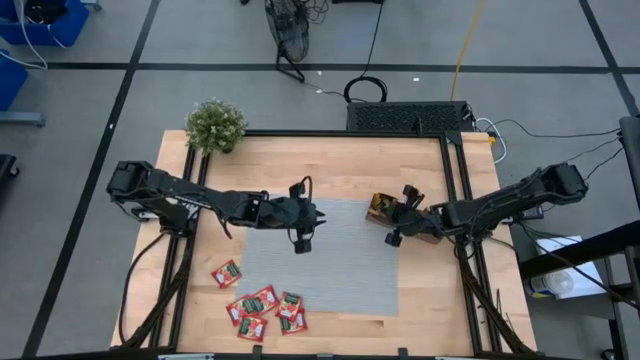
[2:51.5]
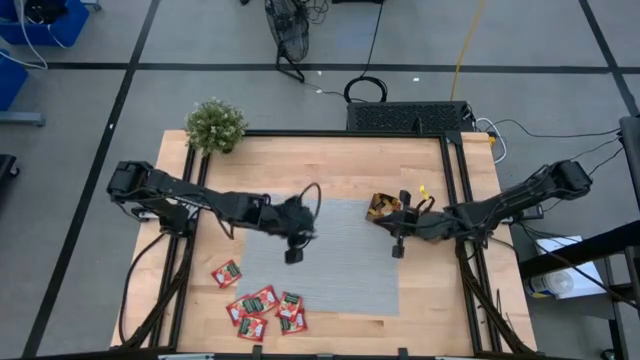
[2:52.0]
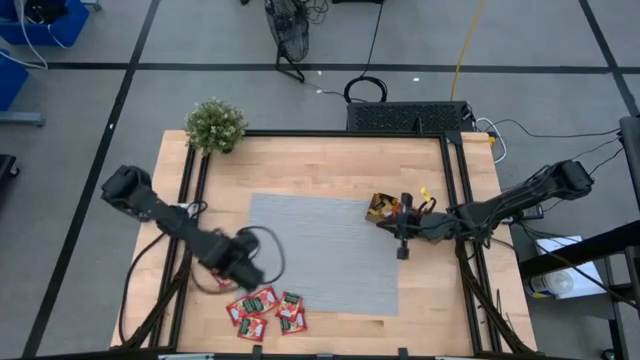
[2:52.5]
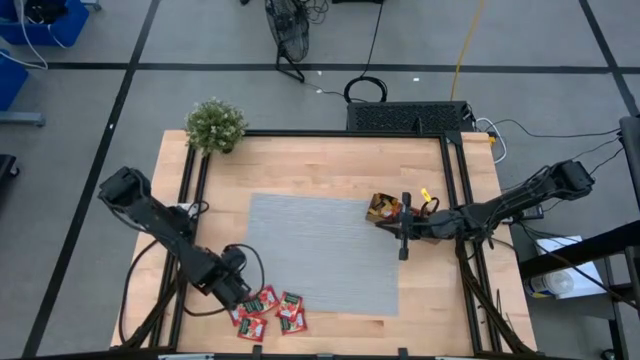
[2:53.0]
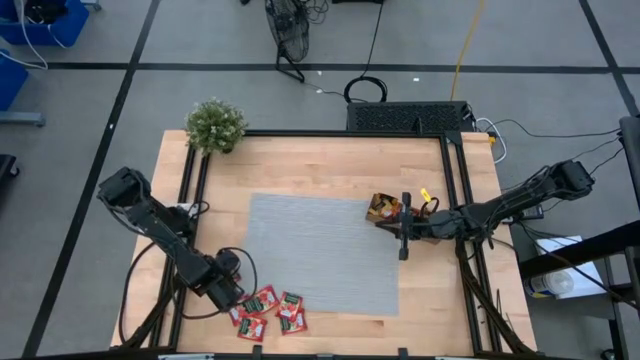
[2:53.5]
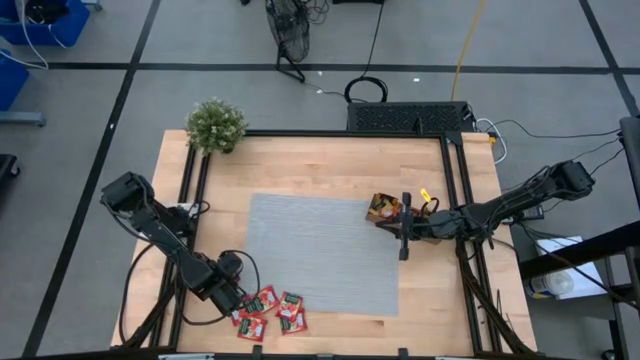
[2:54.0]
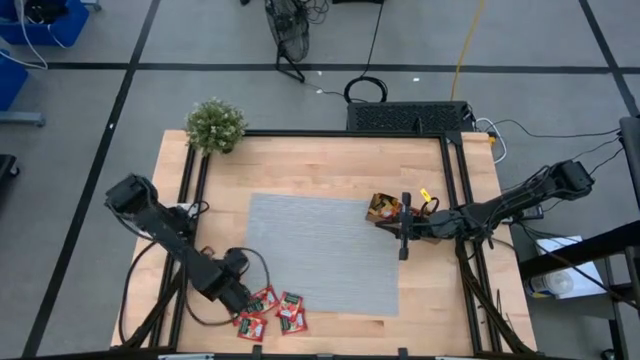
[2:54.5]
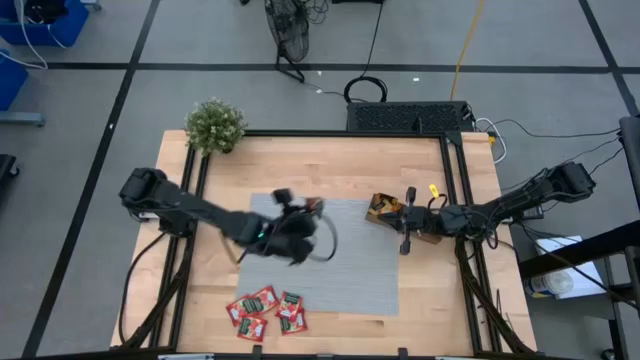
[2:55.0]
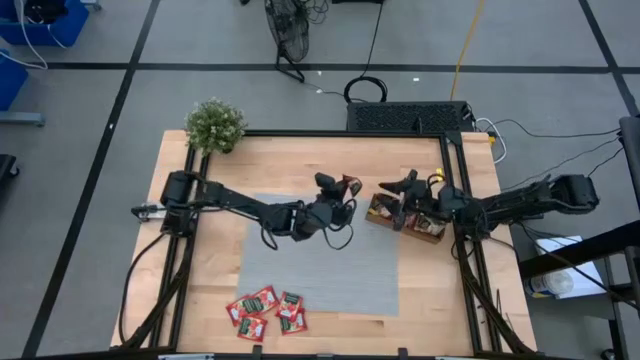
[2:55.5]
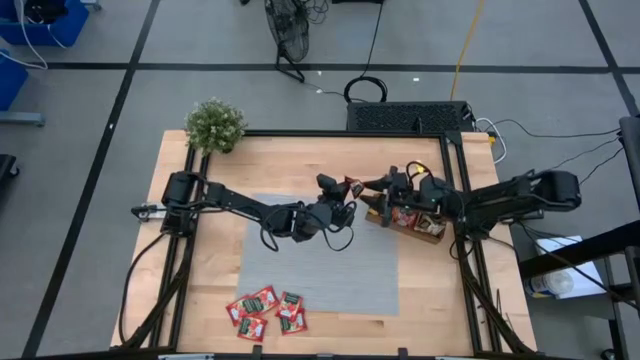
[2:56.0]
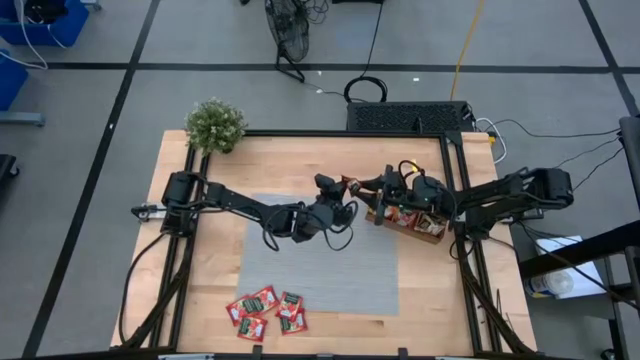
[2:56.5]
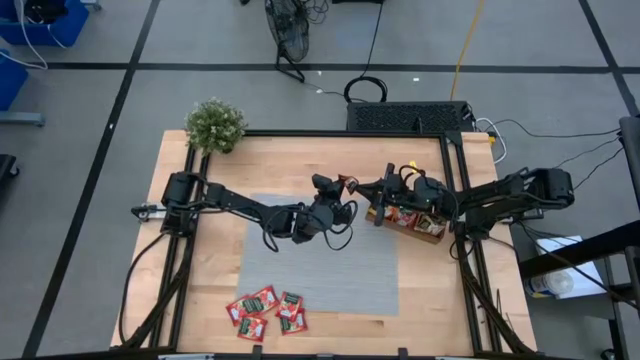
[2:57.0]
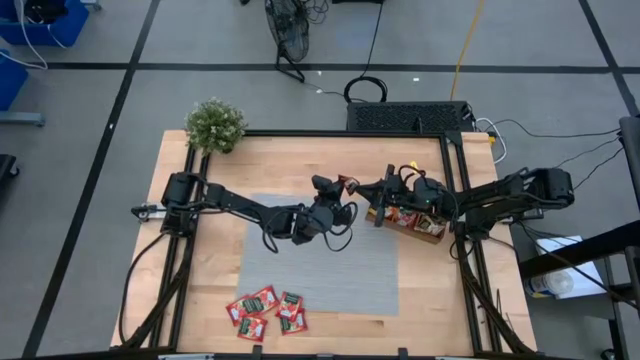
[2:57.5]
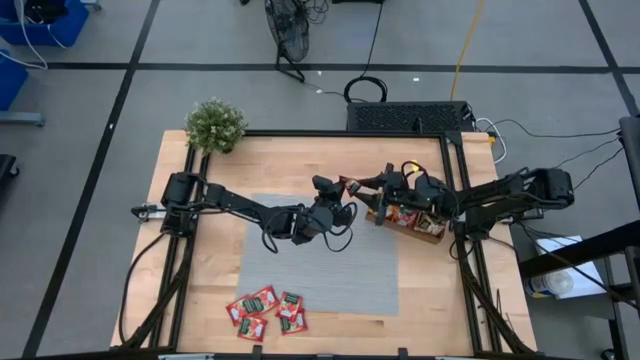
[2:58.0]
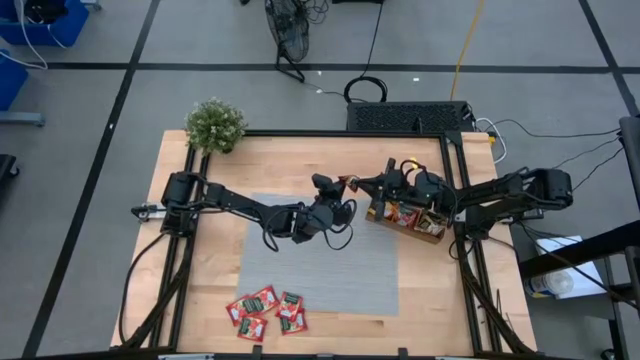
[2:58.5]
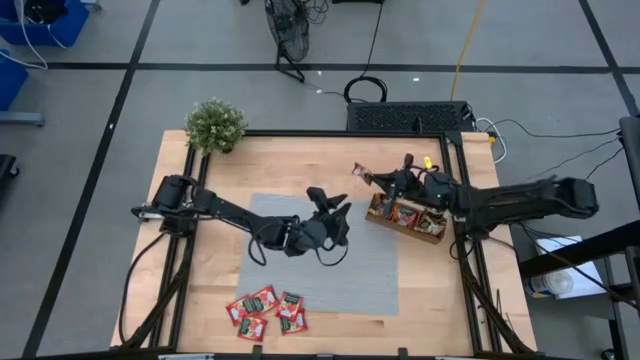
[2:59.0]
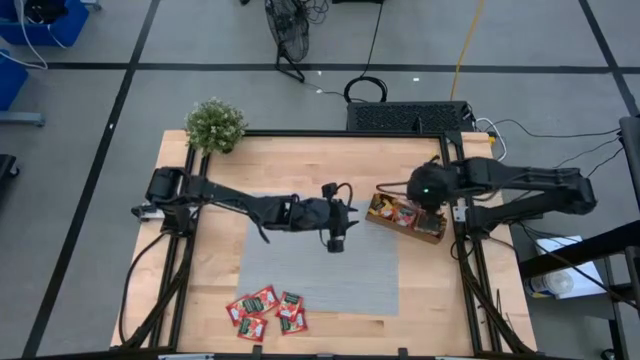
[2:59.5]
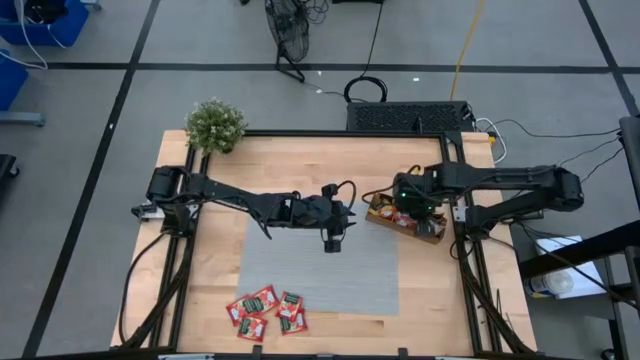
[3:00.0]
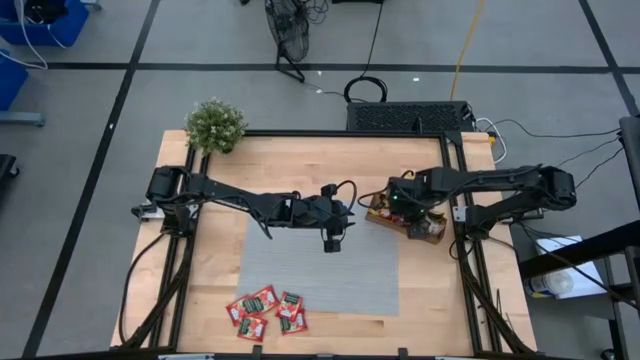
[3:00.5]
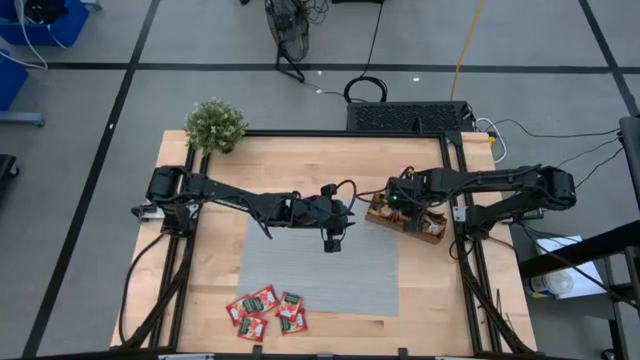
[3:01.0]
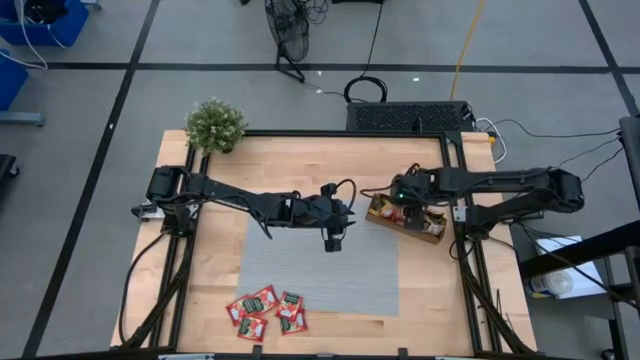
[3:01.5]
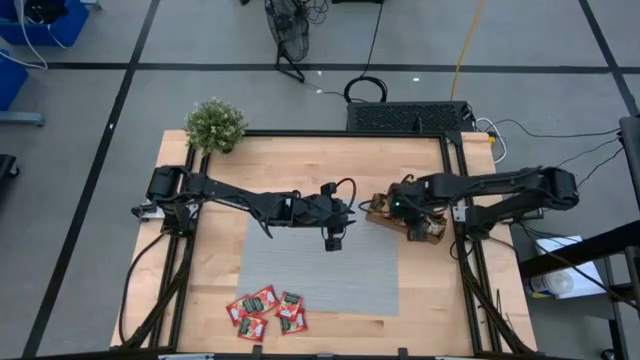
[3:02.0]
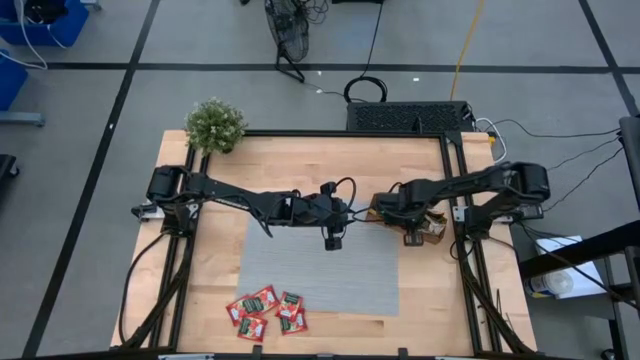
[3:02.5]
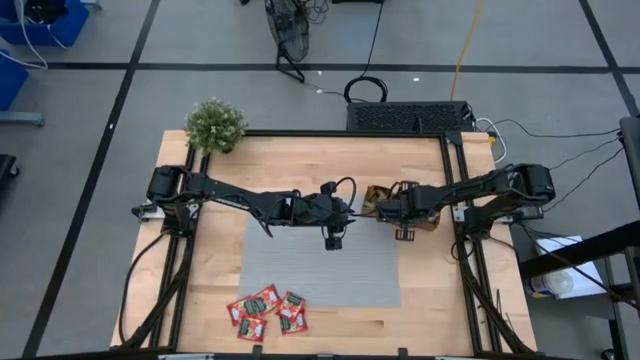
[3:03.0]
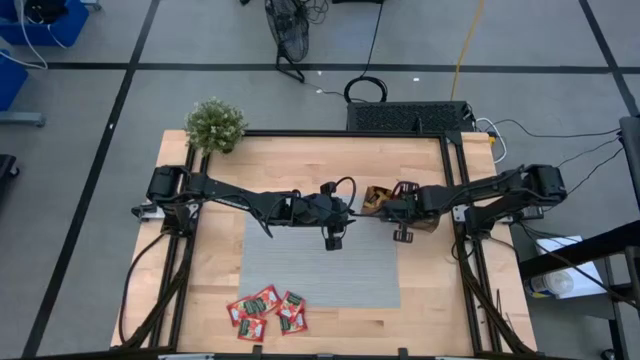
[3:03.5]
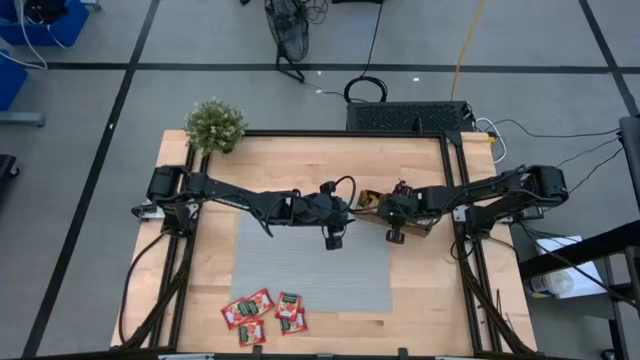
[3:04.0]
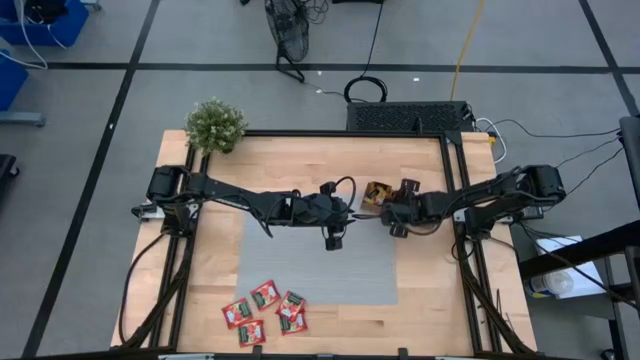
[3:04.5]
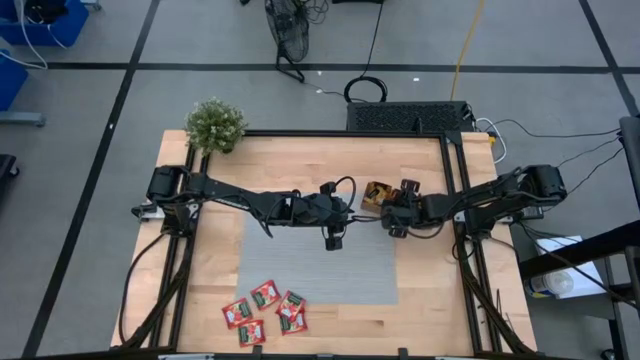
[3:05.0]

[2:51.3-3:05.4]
Task: Pick & Place Tea
Put the red tea bag into the middle section of the wooden organizer

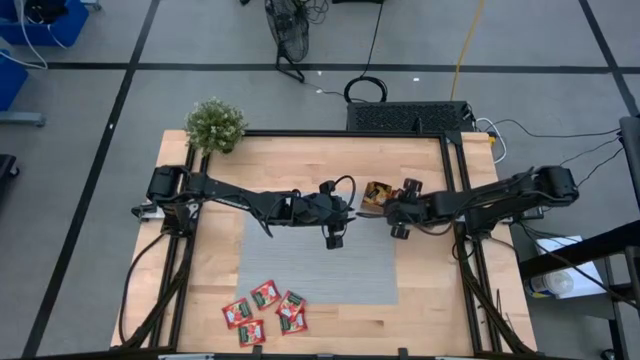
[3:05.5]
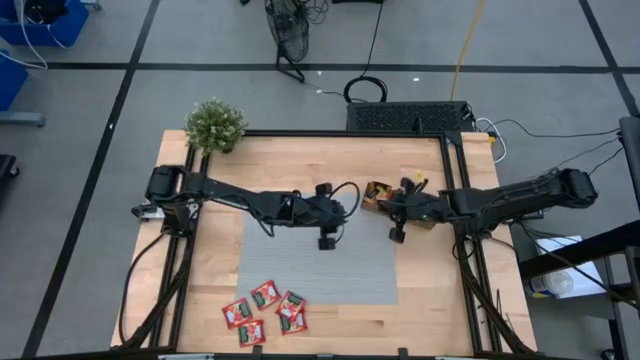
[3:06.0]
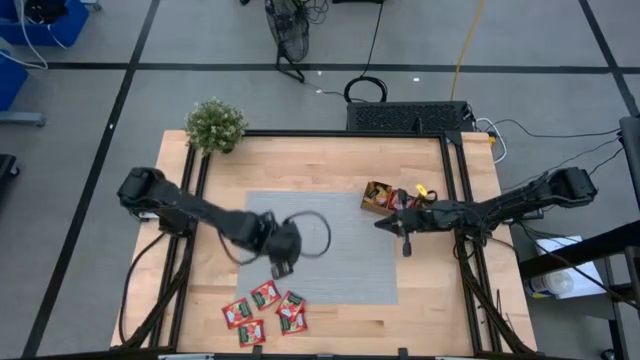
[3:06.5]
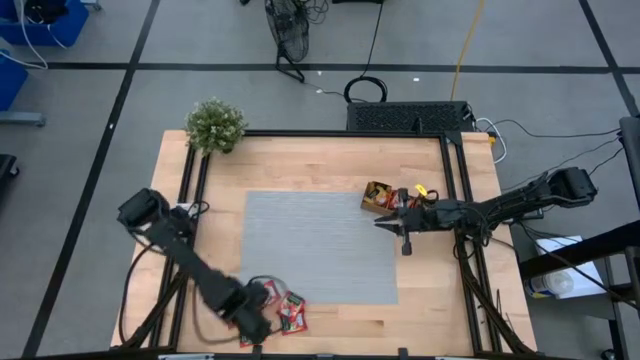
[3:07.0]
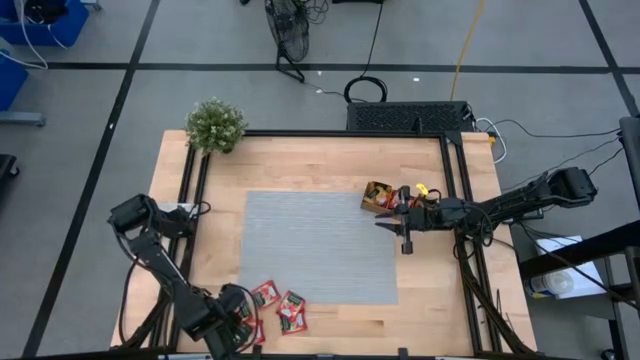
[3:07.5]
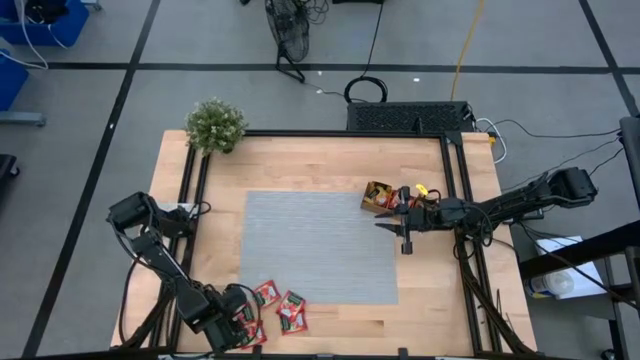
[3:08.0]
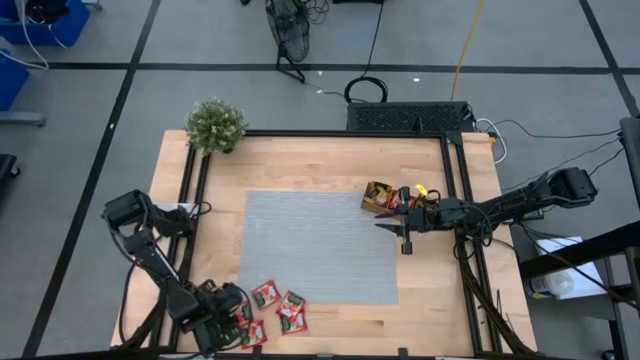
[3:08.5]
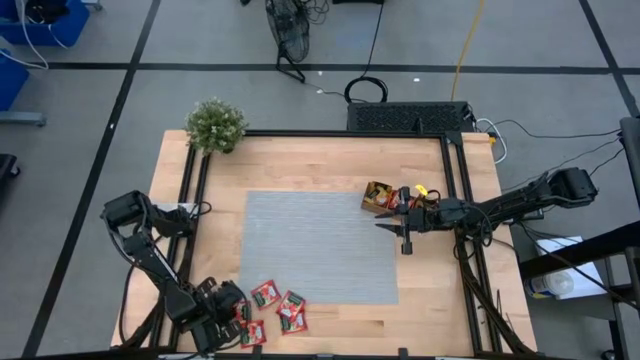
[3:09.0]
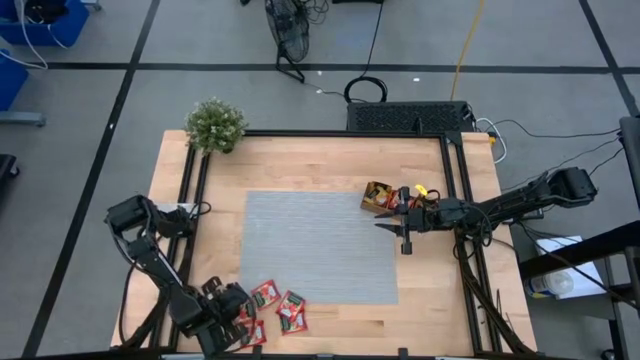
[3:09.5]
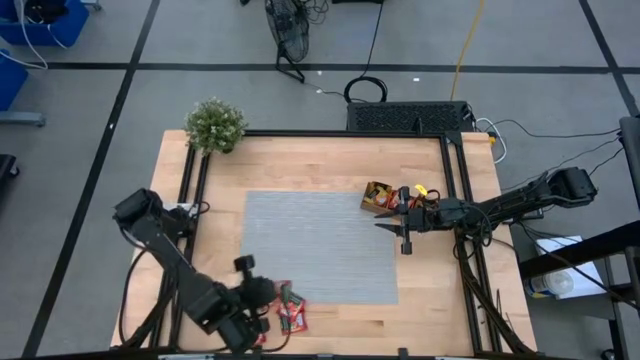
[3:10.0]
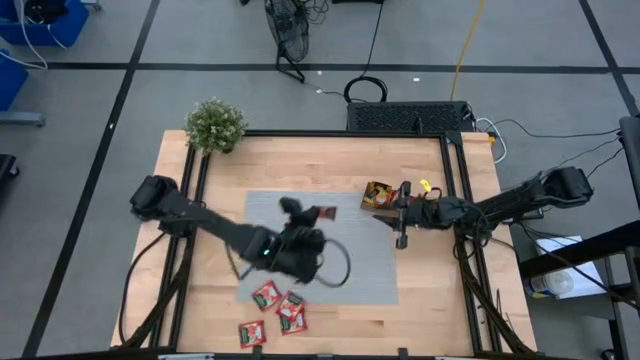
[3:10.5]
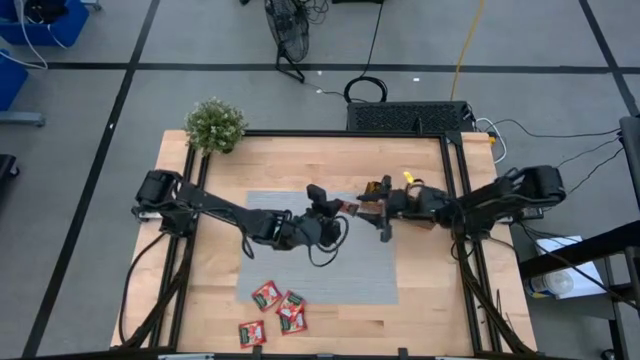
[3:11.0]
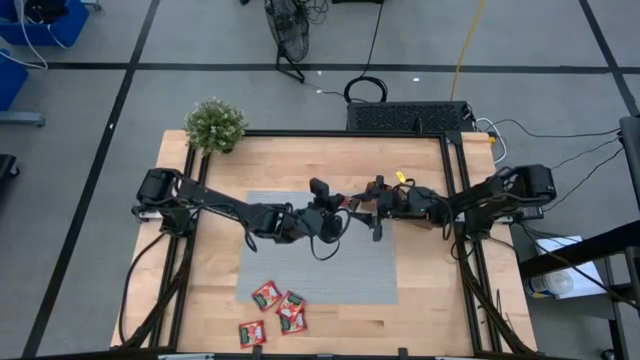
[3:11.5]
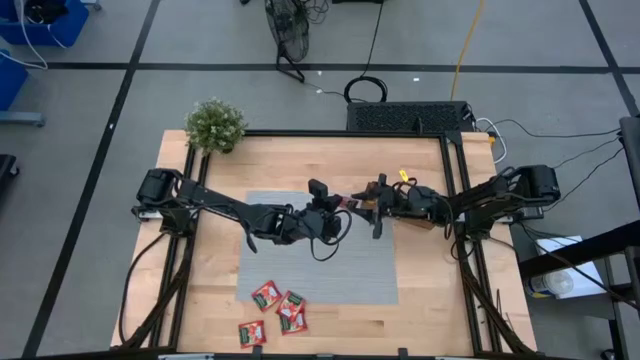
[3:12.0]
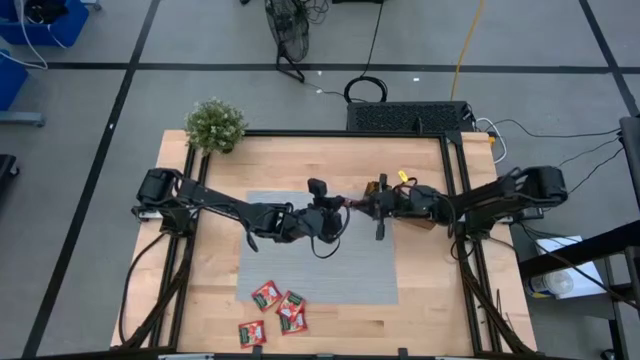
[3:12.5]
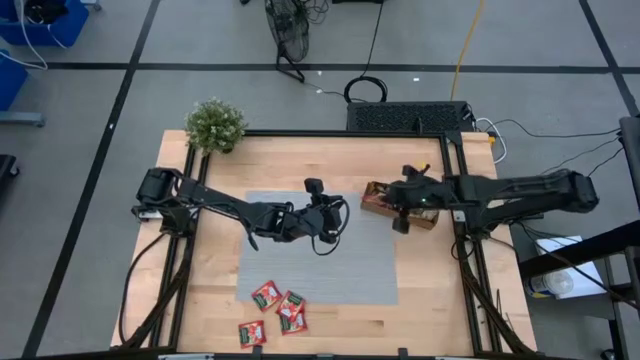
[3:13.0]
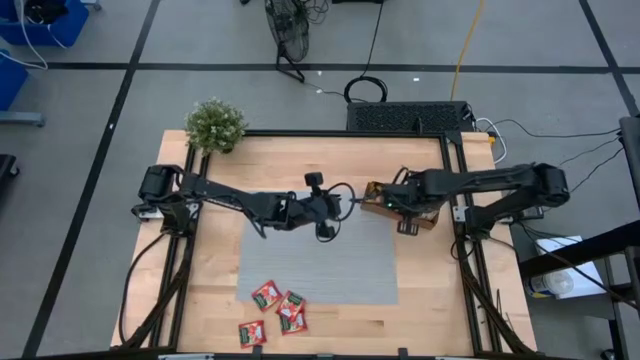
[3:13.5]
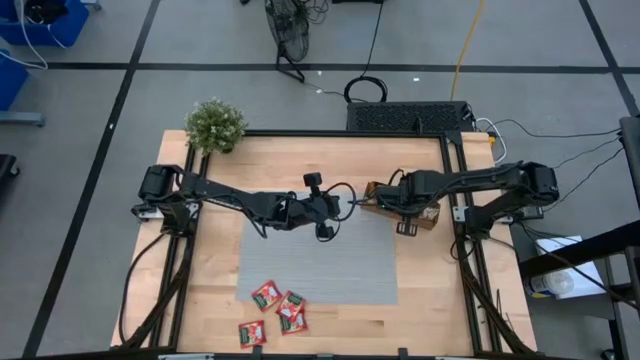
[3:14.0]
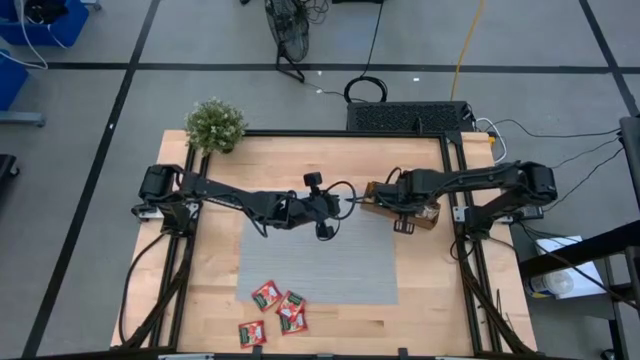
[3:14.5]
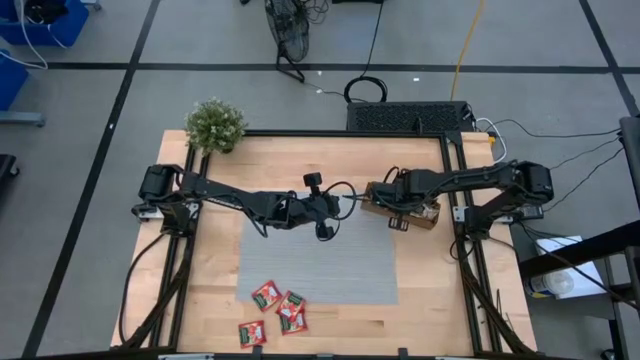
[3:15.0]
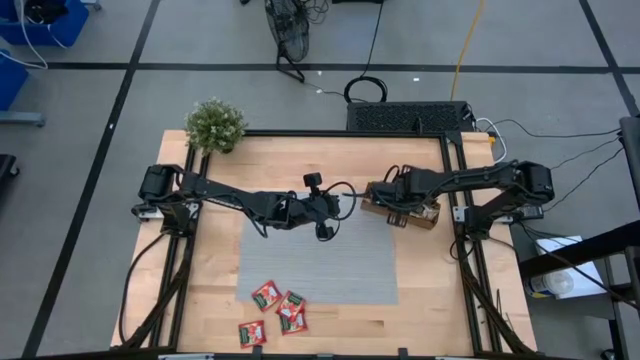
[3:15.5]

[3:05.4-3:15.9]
Put the red tea bag into the middle section of the wooden organizer
